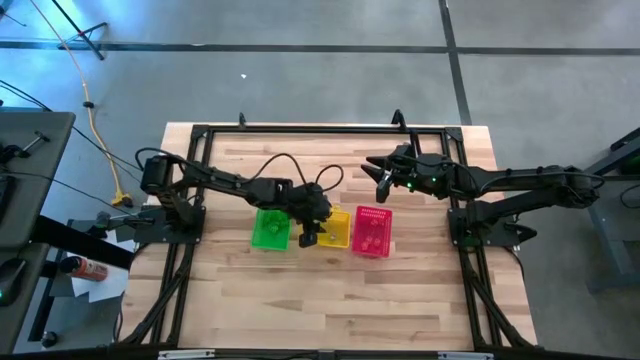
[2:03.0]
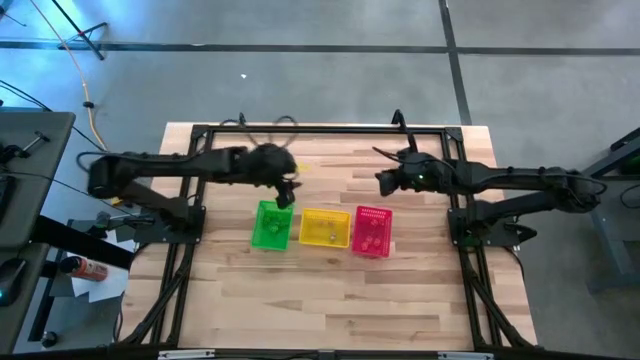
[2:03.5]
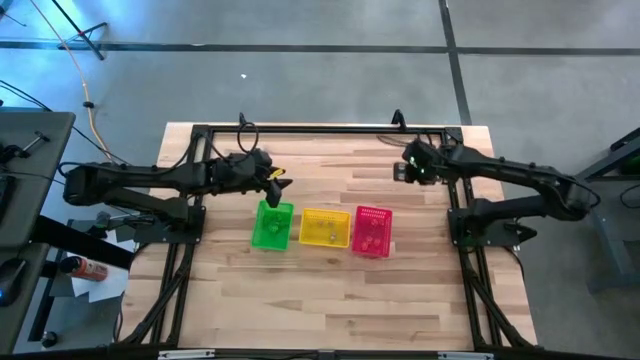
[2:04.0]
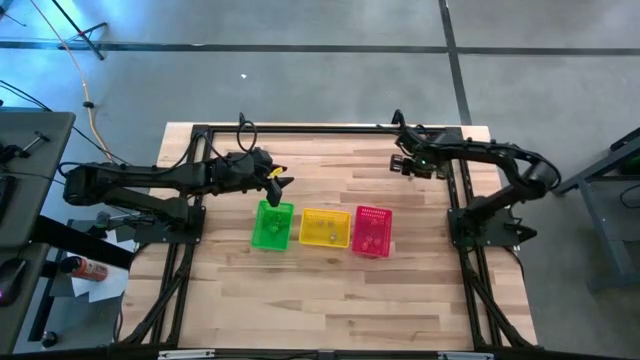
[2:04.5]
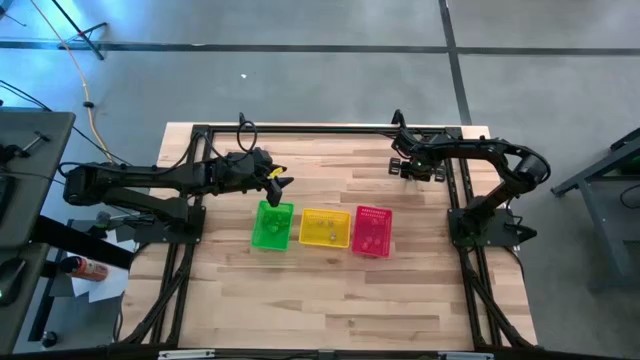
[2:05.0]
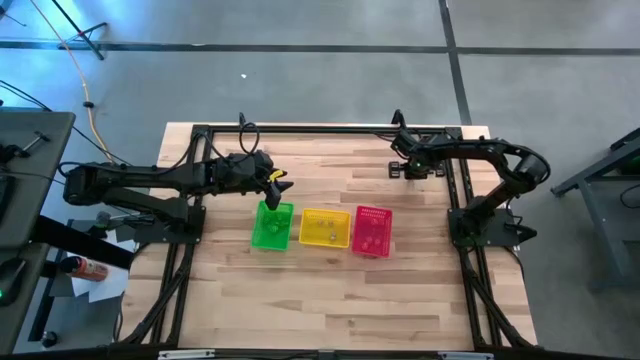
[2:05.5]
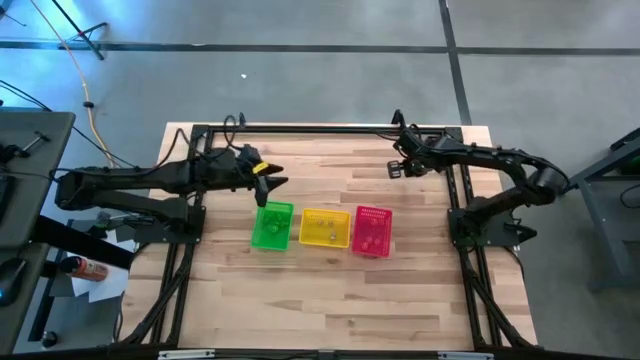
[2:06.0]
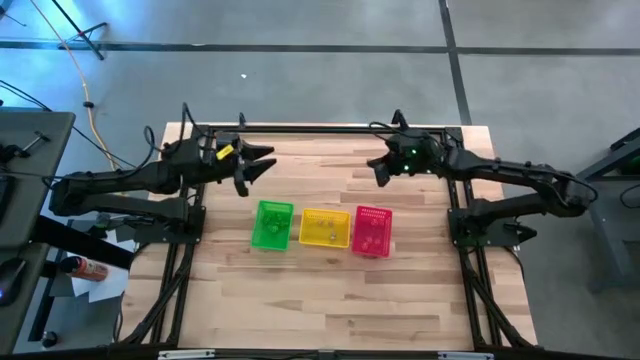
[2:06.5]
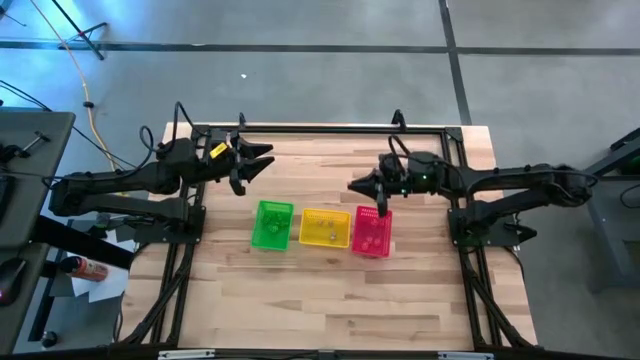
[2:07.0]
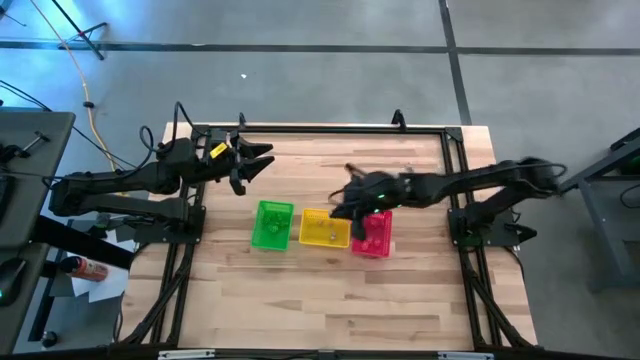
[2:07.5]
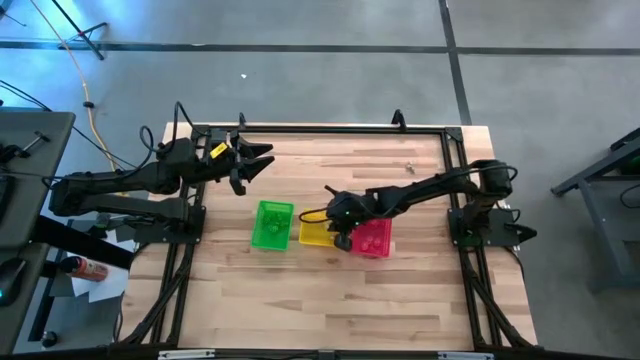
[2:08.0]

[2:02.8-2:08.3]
Task: Sort Halloween decoration
Put the white skull toy into the yellow basket

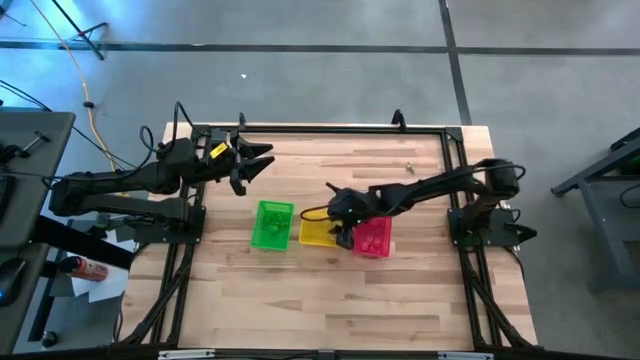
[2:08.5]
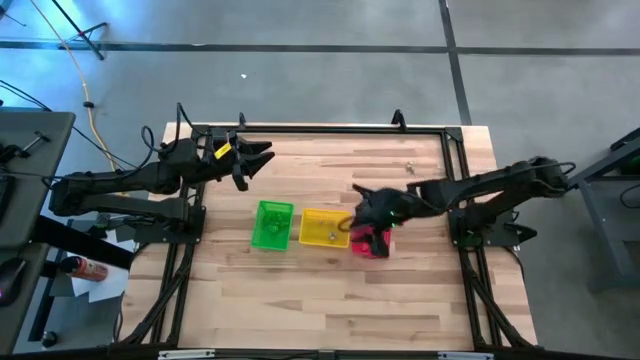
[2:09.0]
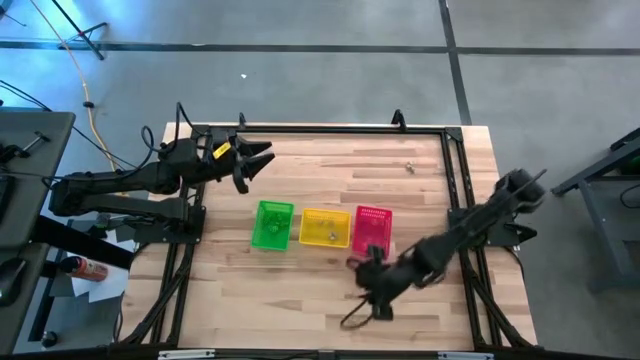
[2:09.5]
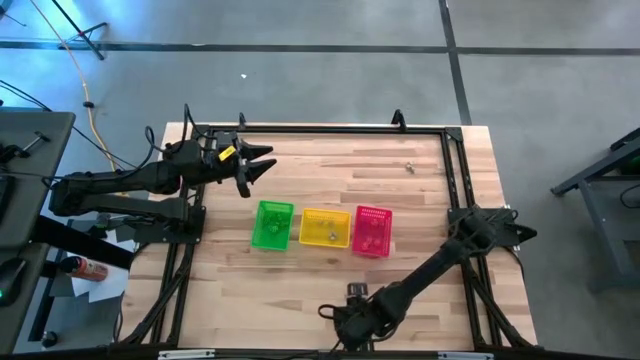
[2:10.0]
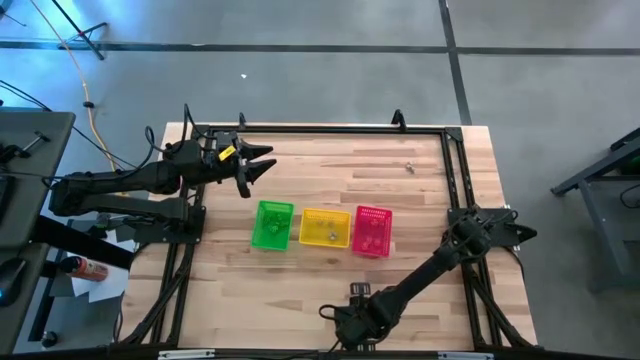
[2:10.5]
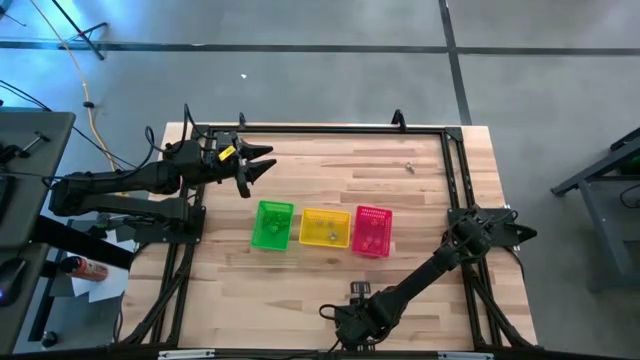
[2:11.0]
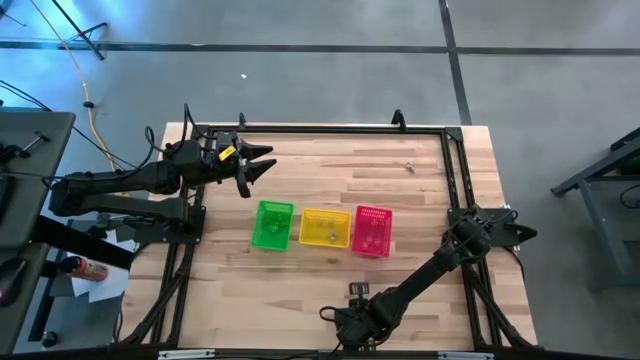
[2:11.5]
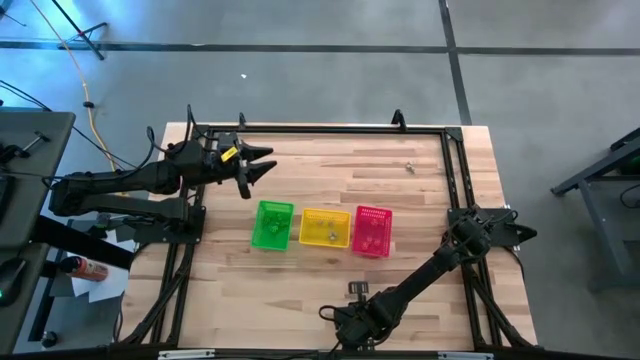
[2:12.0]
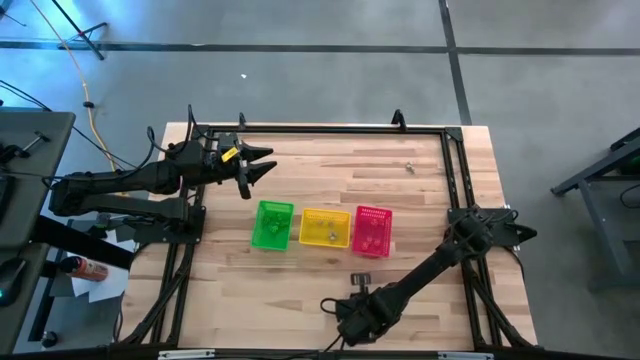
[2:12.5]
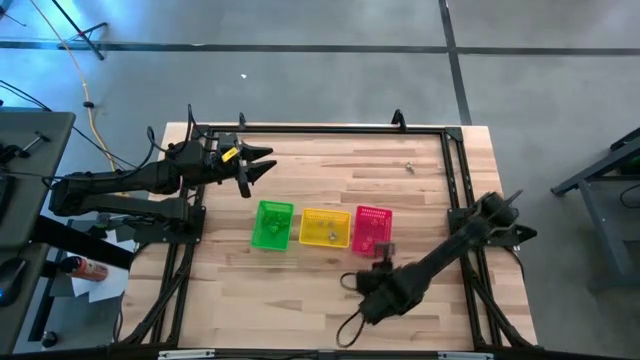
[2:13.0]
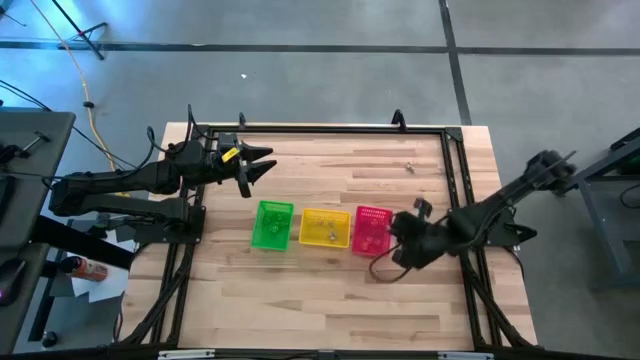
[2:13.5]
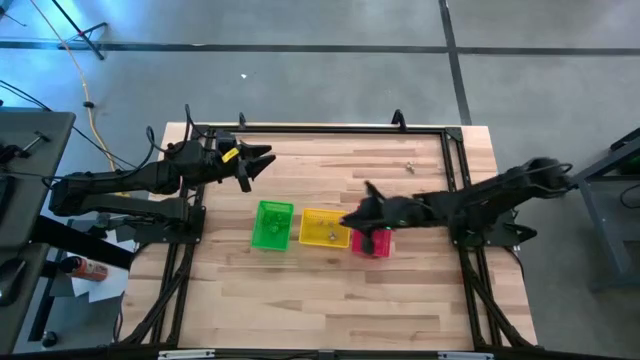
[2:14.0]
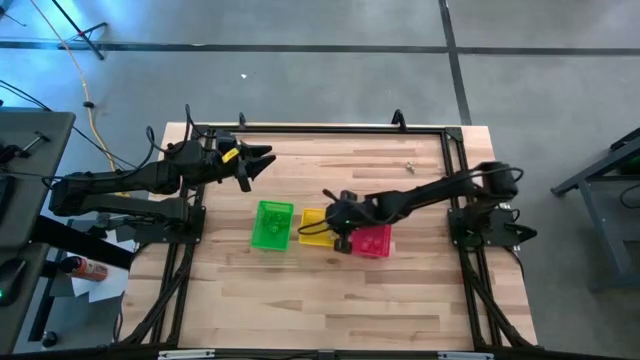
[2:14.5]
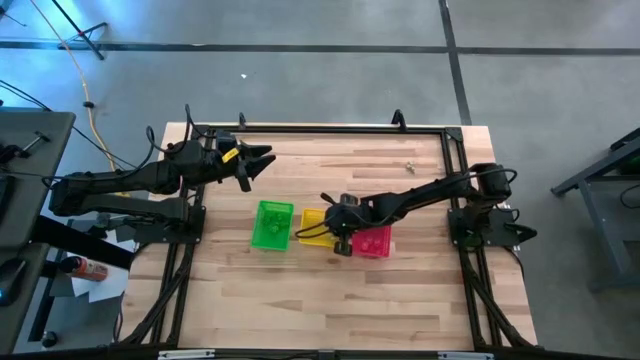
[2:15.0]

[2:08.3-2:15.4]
Put the white skull toy into the yellow basket

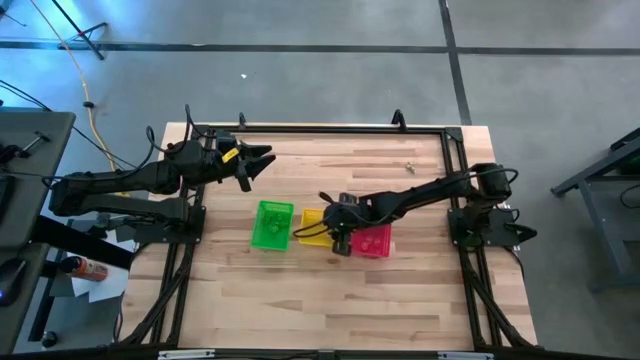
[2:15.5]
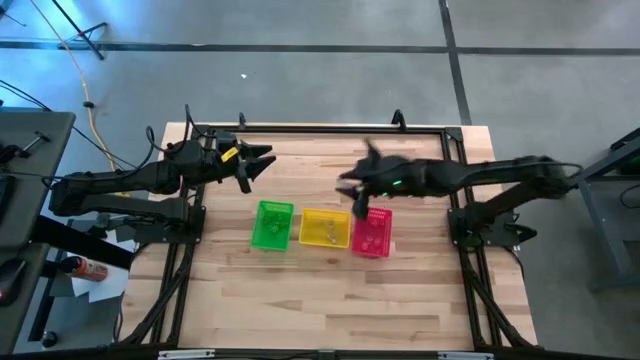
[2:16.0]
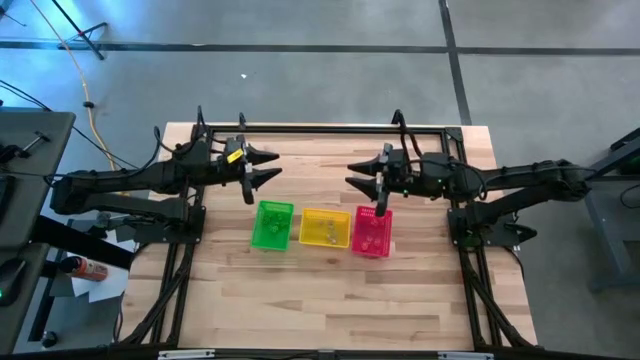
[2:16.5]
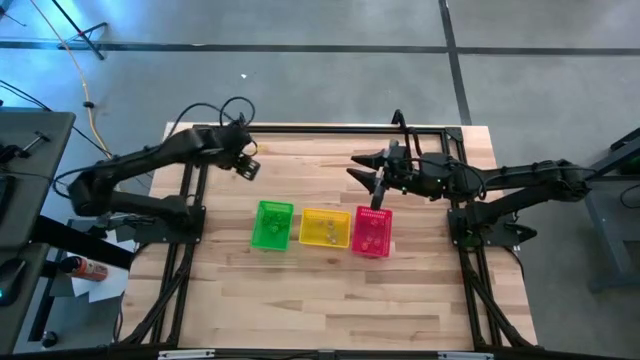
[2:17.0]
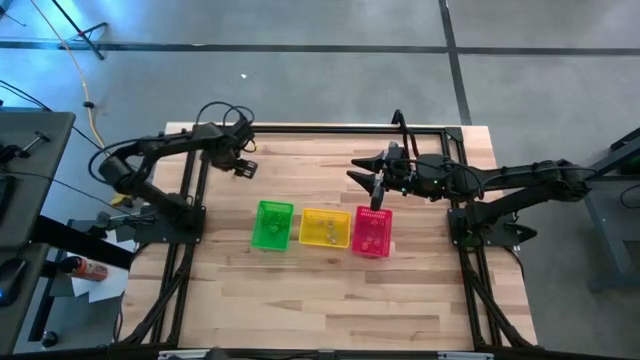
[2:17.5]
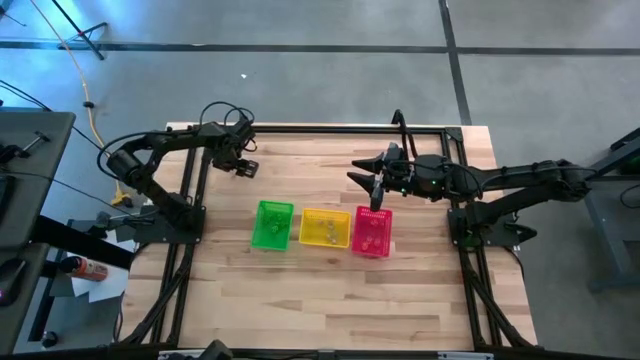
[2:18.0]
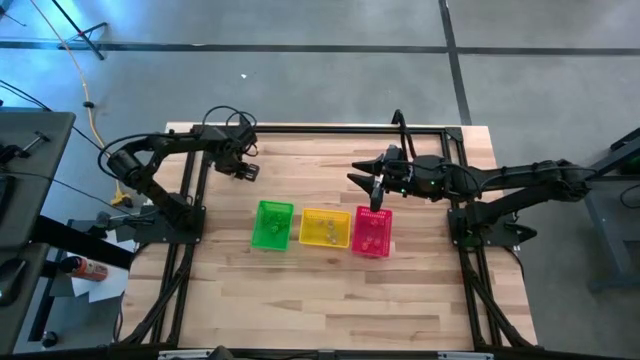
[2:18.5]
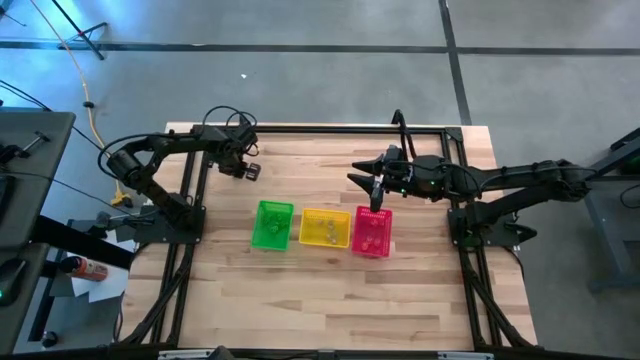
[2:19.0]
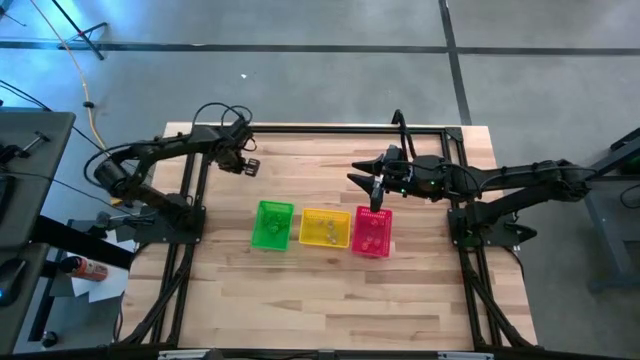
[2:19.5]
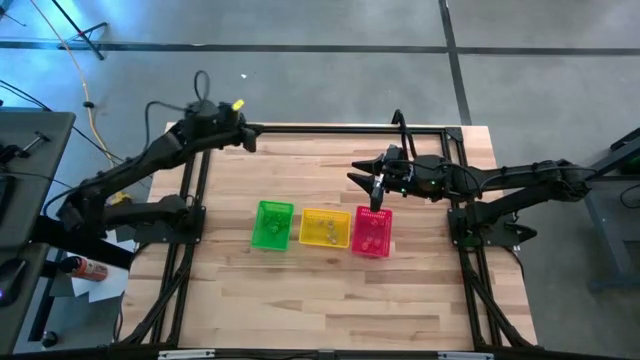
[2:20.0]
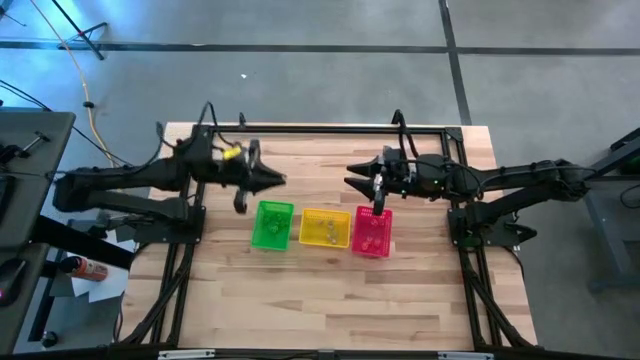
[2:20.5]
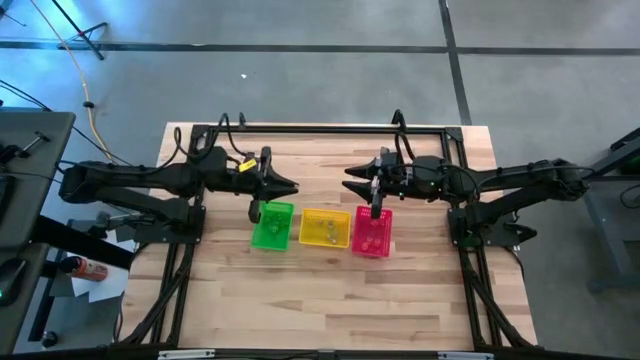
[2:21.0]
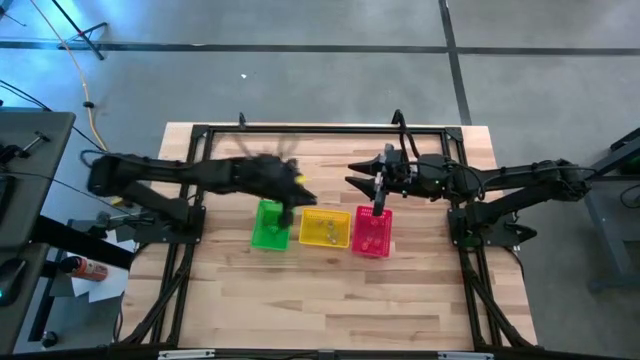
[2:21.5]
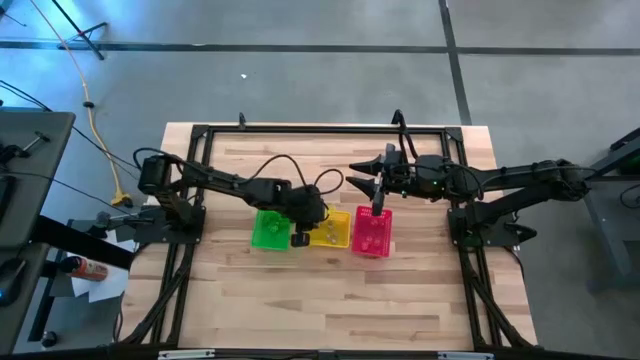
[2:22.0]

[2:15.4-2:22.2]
Put the white skull toy into the yellow basket

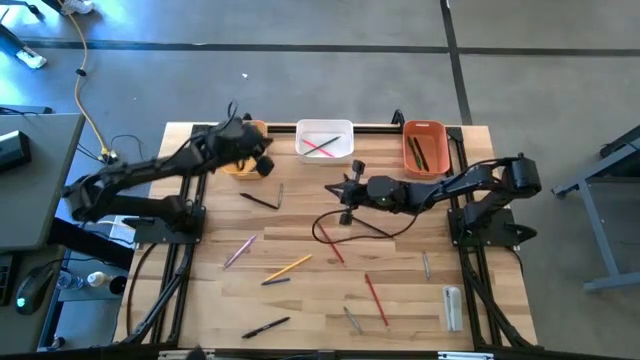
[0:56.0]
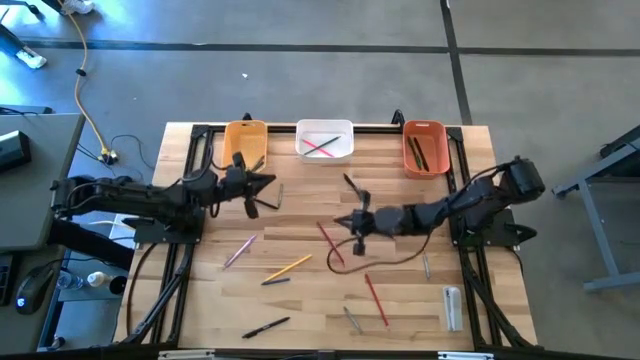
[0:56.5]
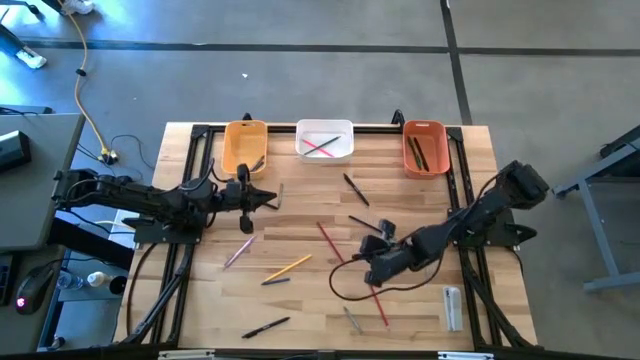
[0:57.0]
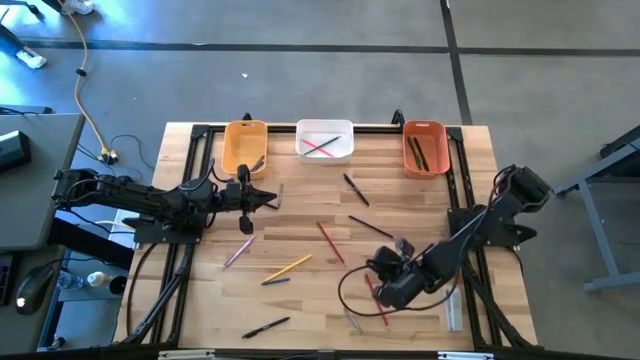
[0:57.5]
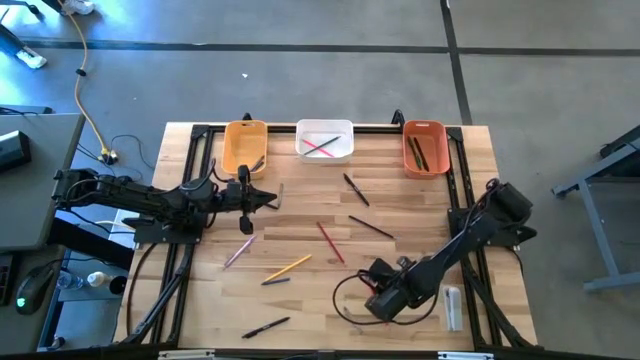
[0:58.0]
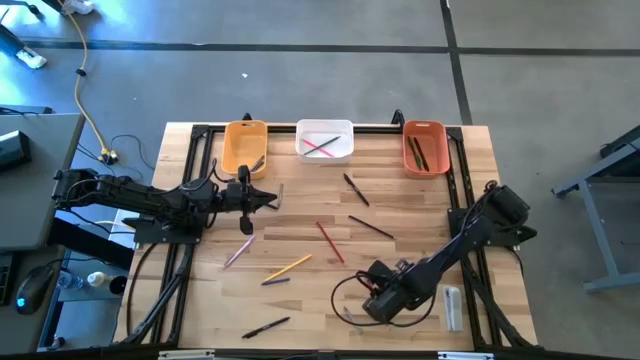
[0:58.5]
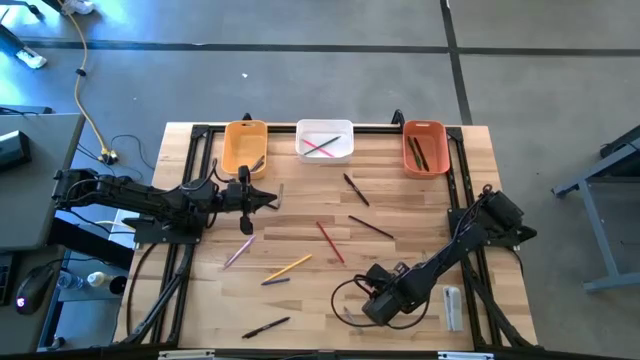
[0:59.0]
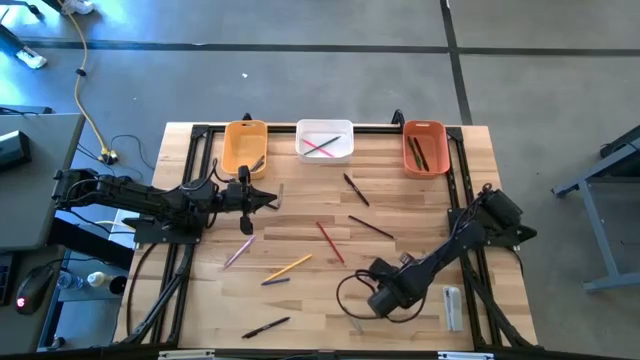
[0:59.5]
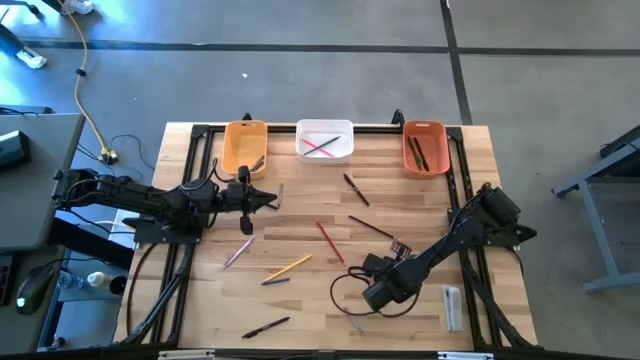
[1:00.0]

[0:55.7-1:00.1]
Task: Sort crayons/erasers/pens/pencils in bins
Put the red color pencil into the white bin
